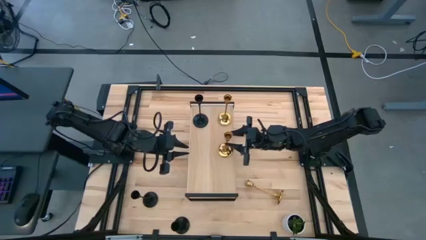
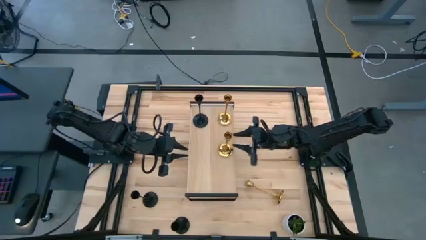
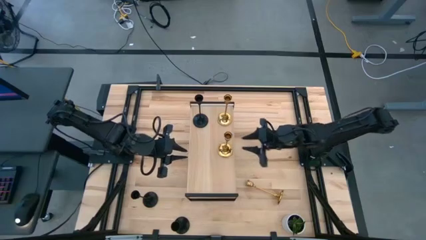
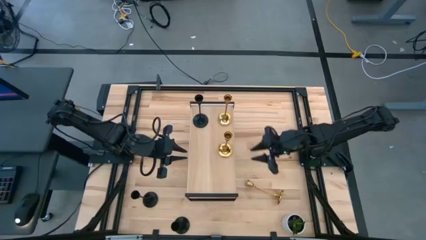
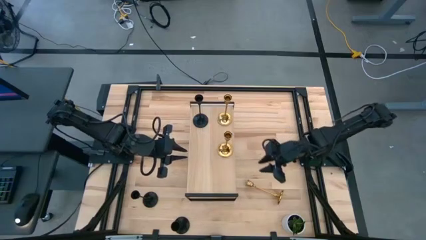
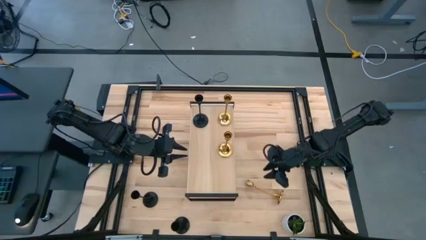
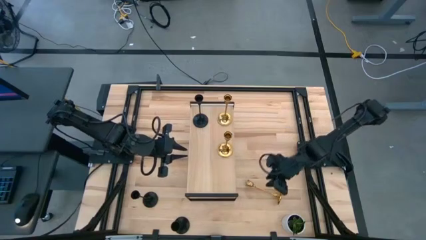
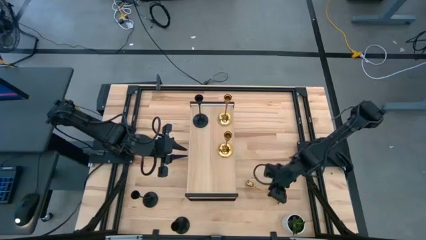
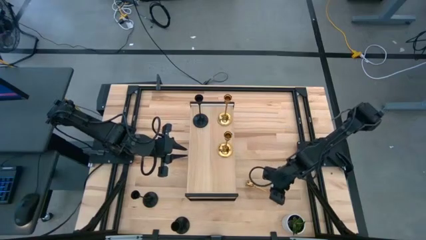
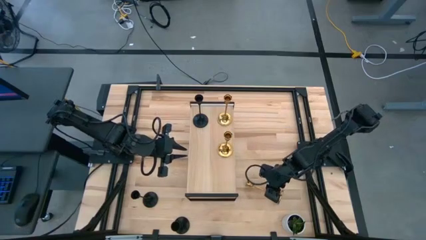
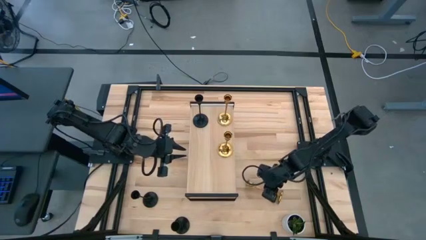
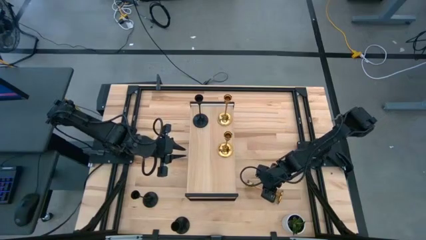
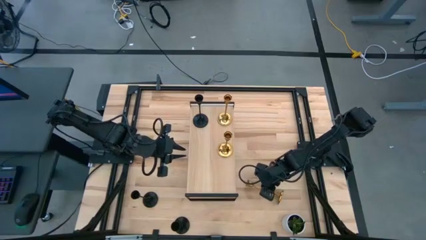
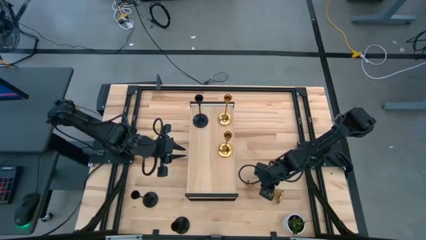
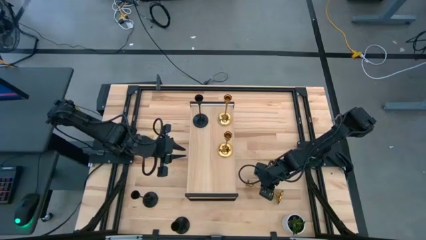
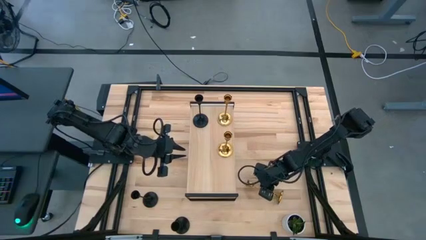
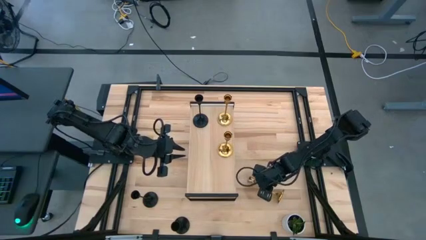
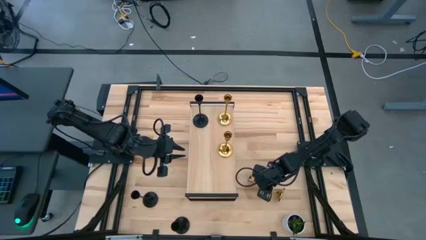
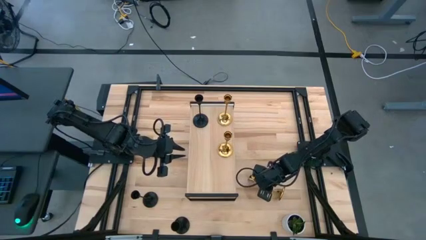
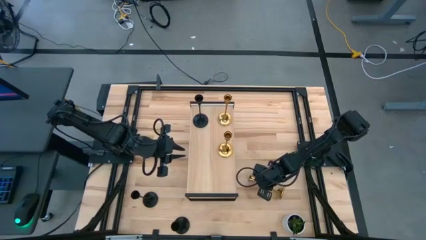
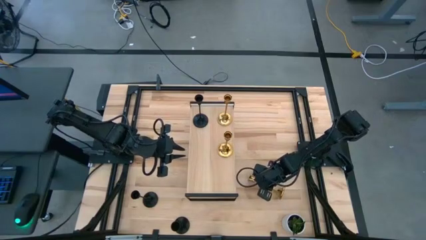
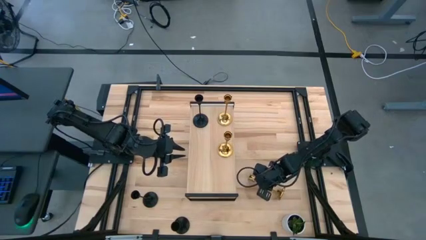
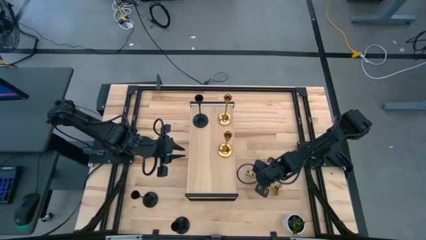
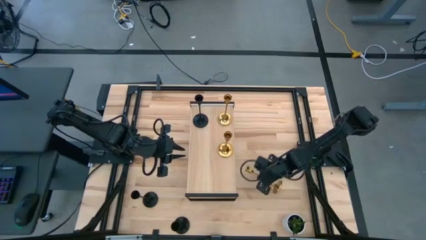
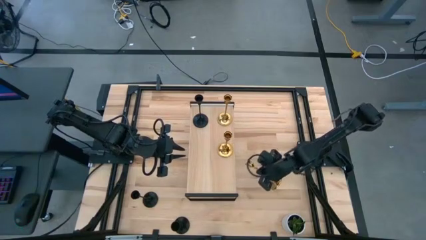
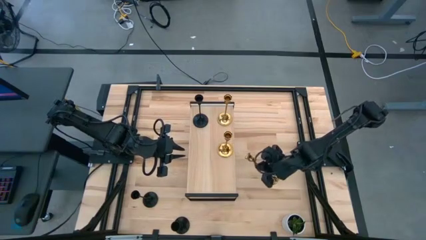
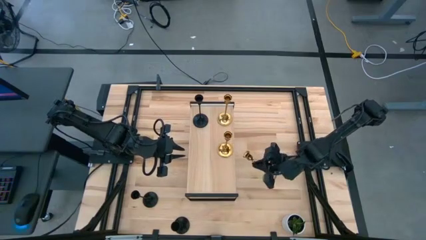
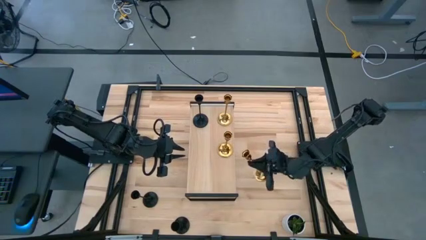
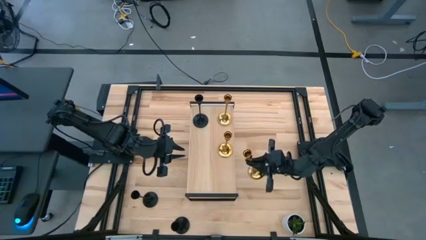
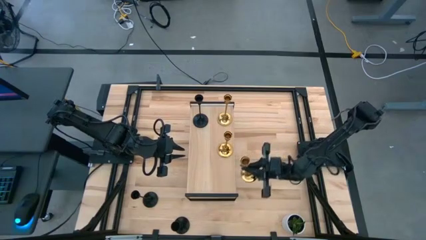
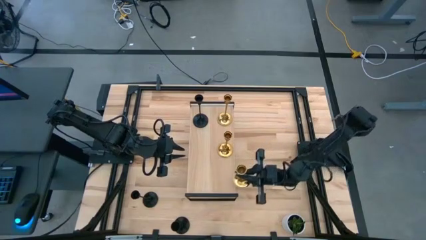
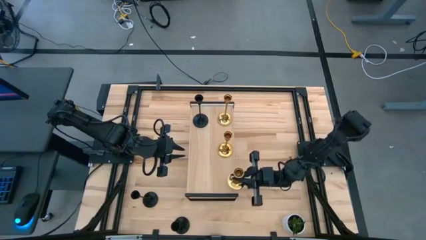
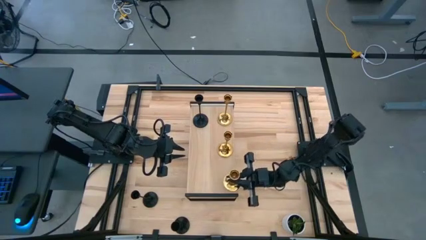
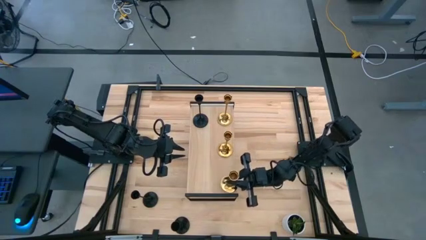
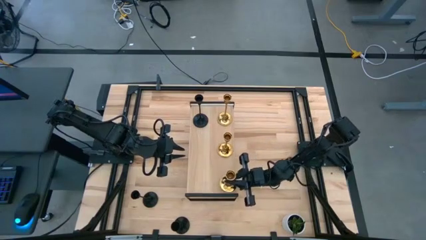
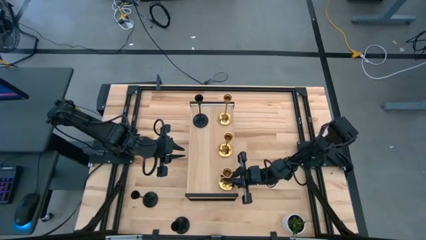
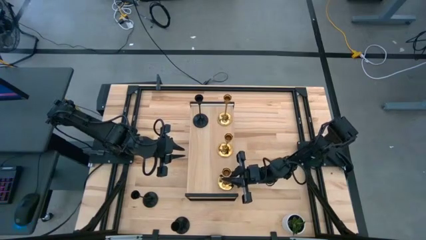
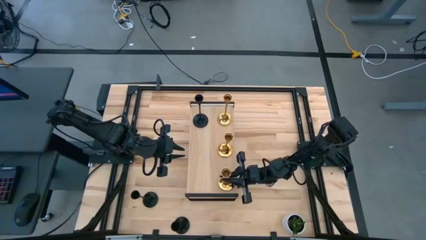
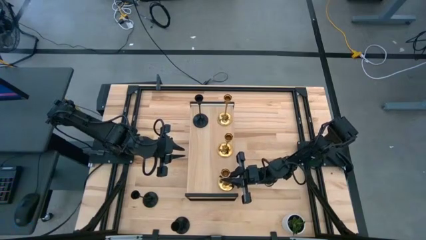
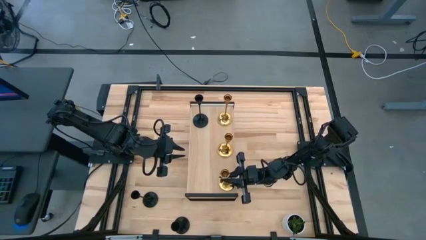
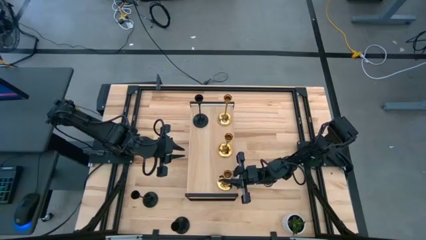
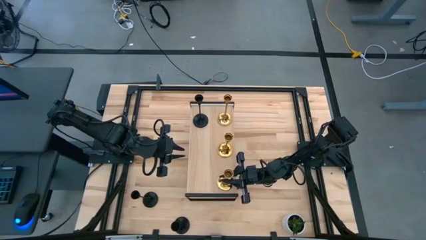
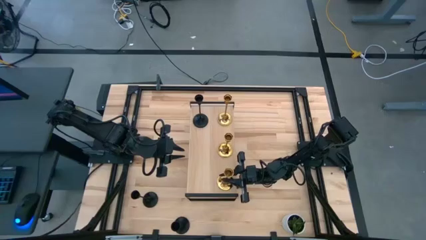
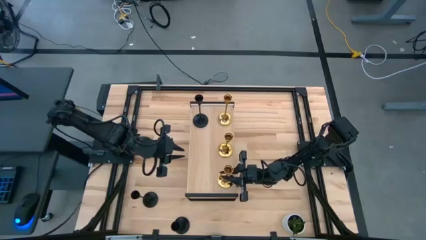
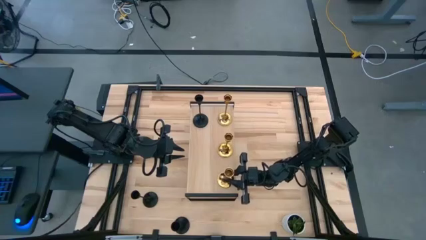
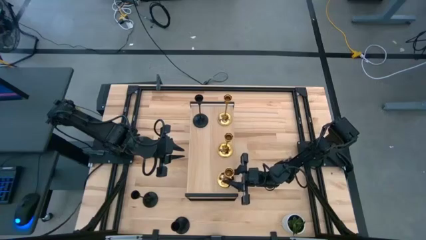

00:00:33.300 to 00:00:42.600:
Task: Pick & Place candle stick holders
Put the gold candle holder on the shelf aligned with the other gold candle holders

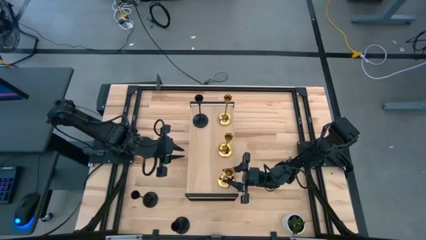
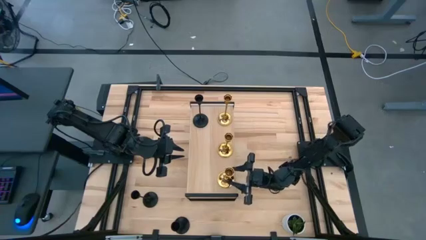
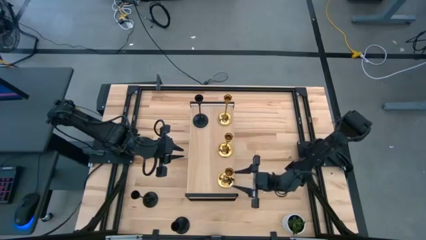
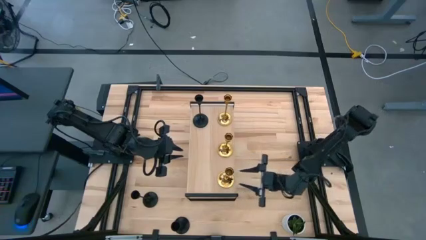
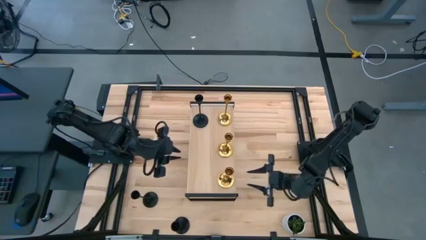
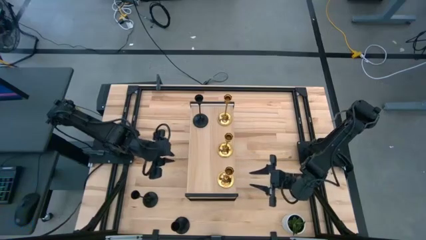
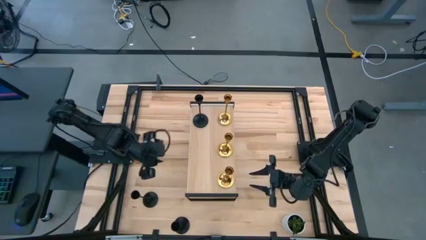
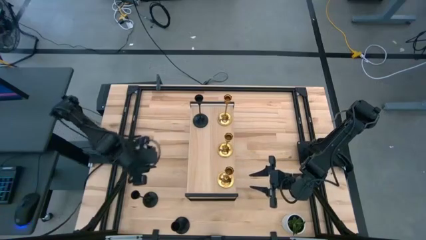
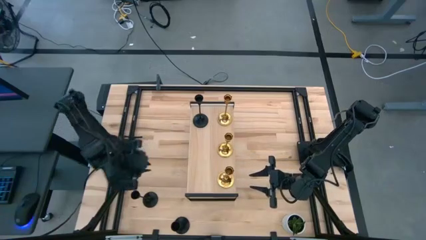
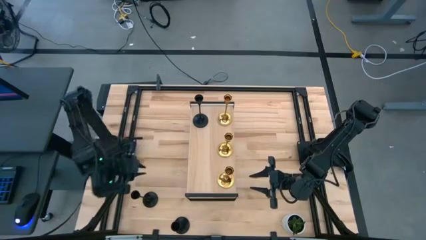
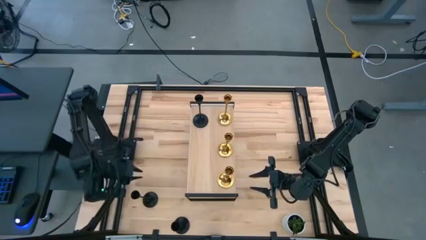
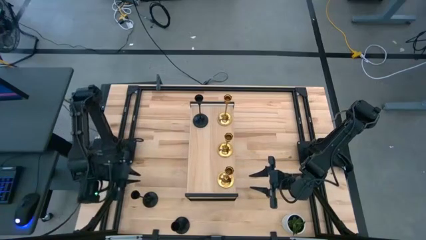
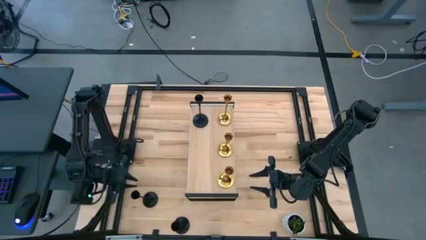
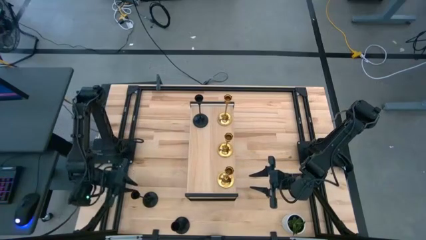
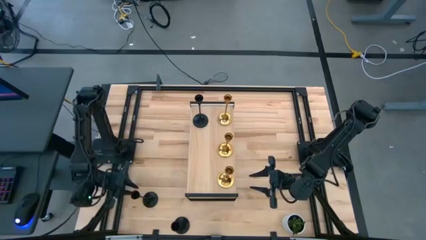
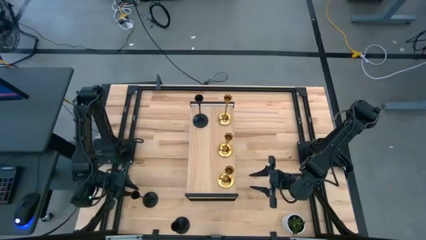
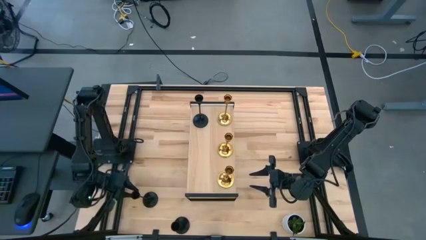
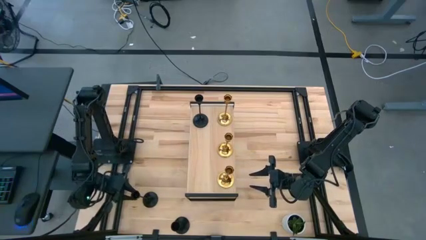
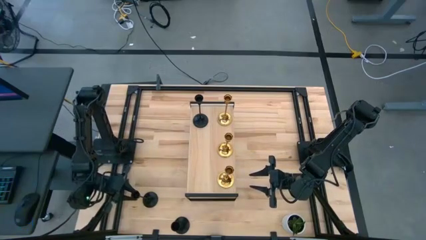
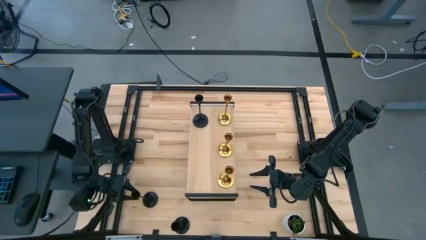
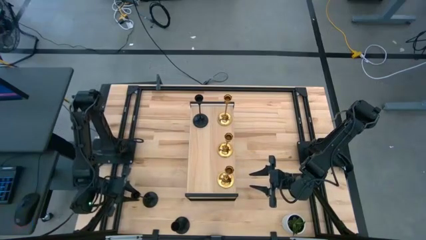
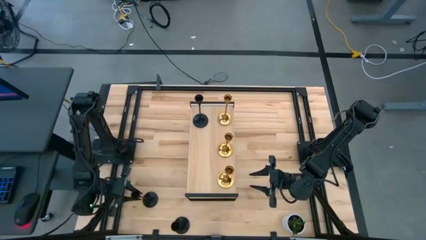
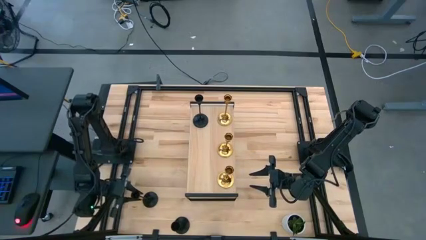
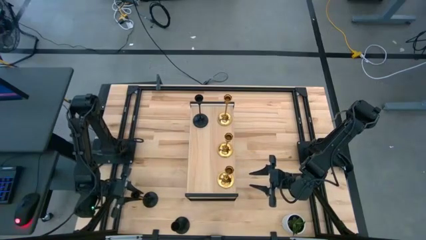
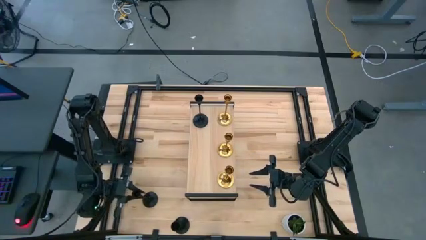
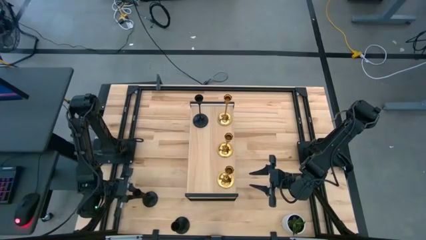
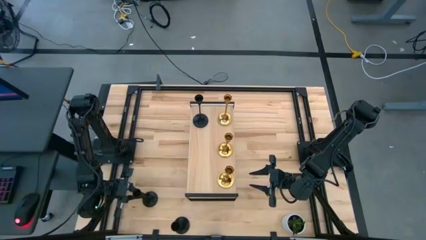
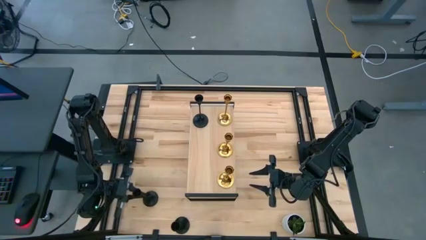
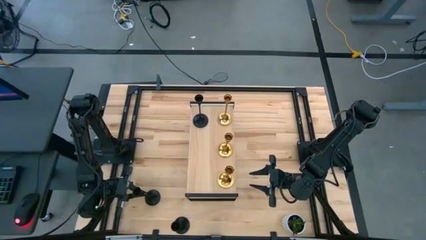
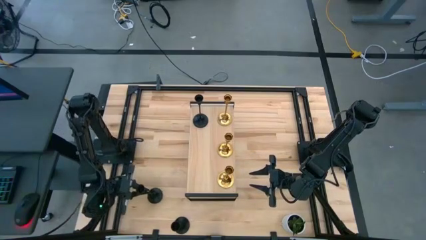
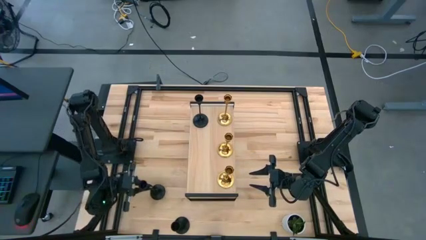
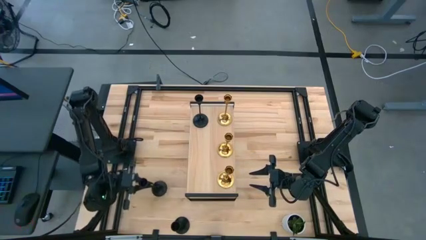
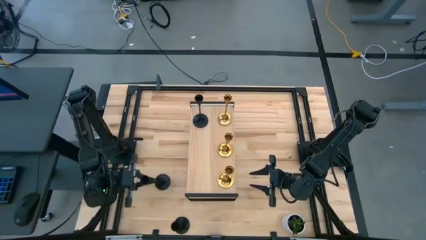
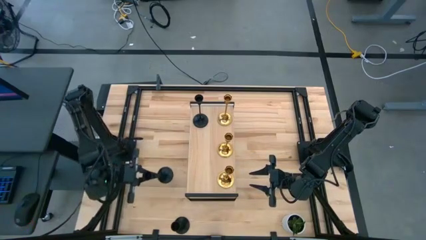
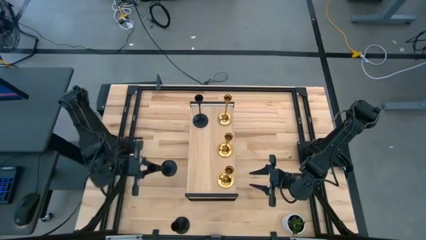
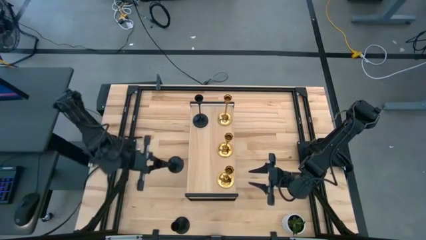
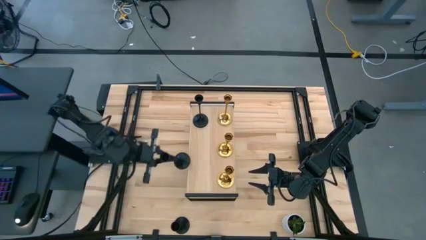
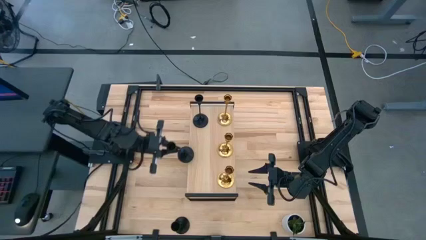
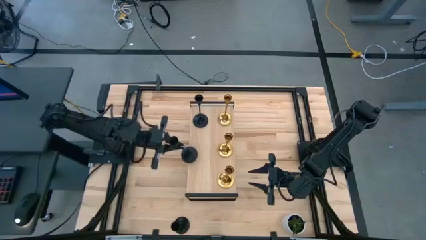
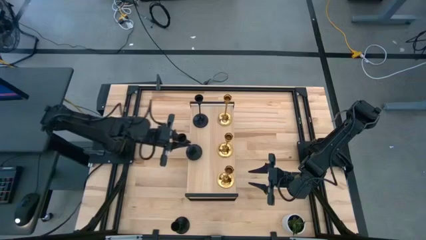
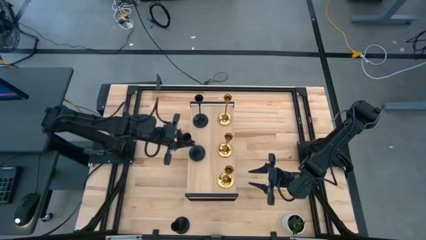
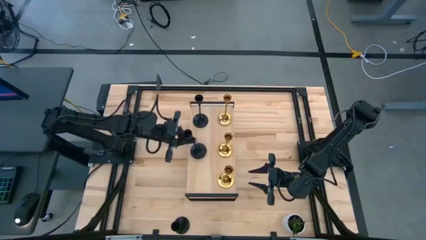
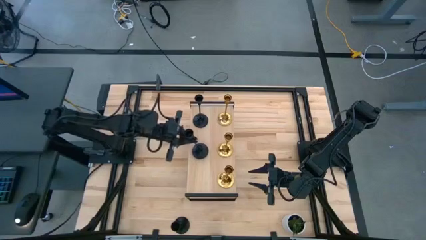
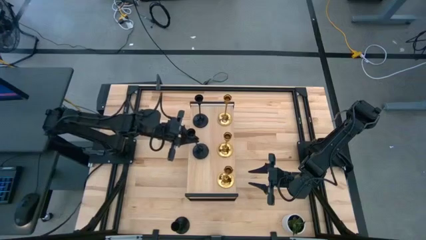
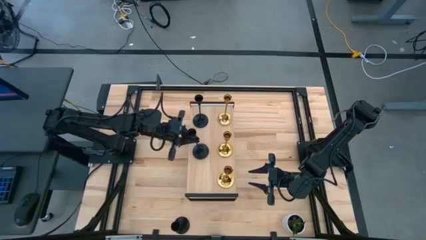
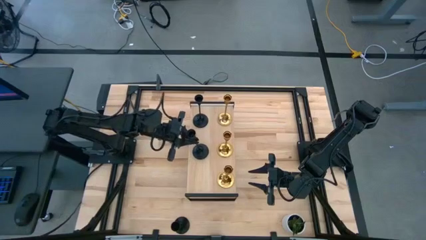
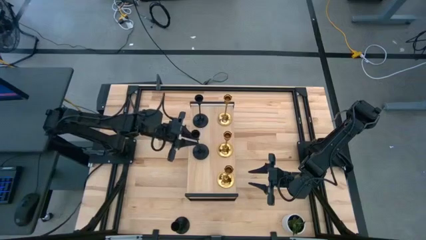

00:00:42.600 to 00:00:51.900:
Put the left black candle holder on the shelf aligned with the other black candle holder
